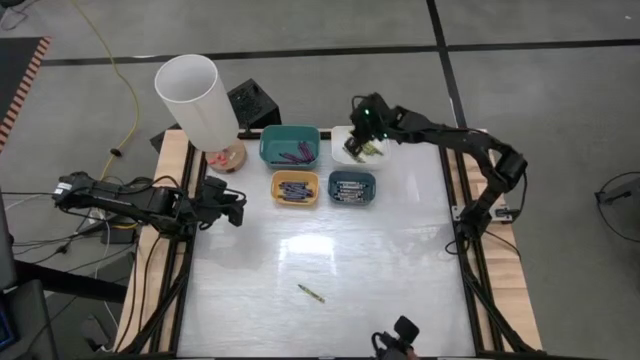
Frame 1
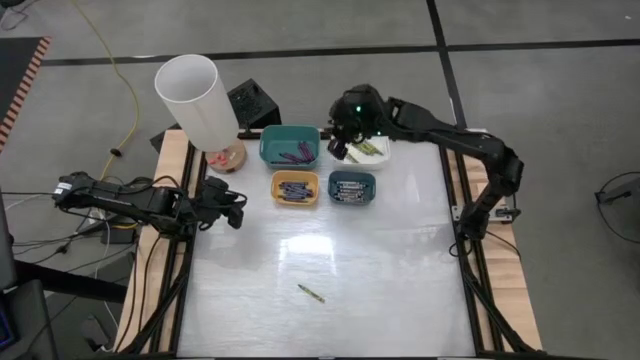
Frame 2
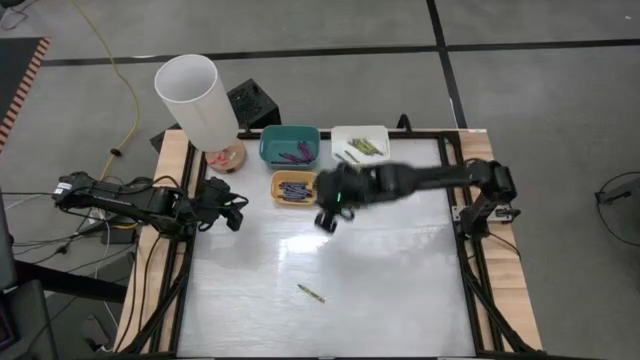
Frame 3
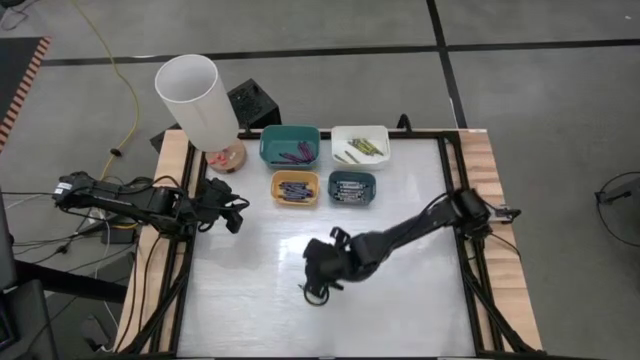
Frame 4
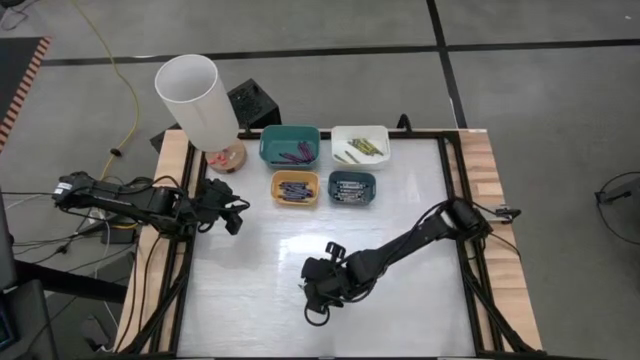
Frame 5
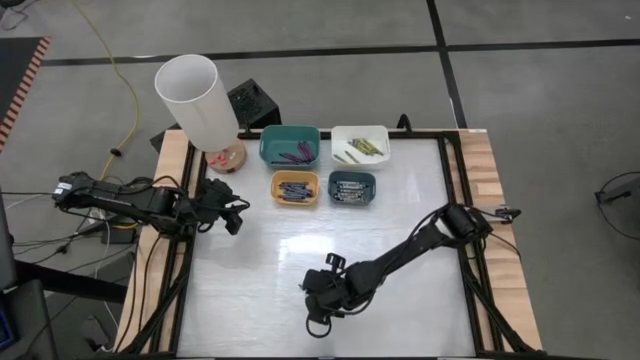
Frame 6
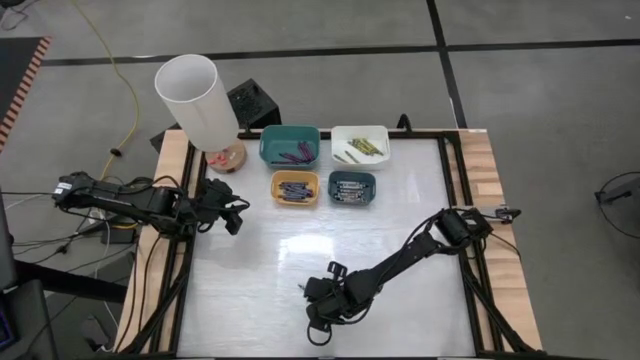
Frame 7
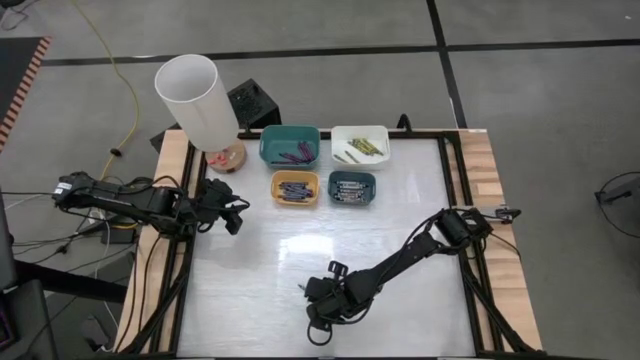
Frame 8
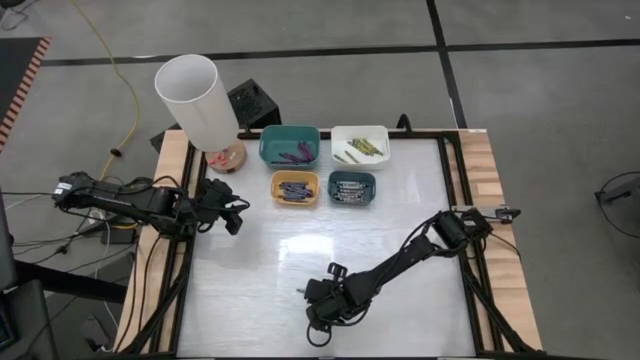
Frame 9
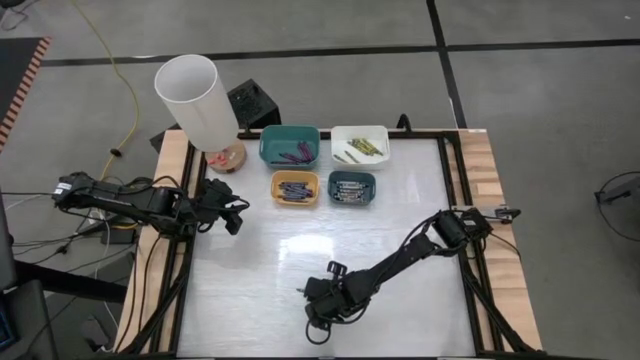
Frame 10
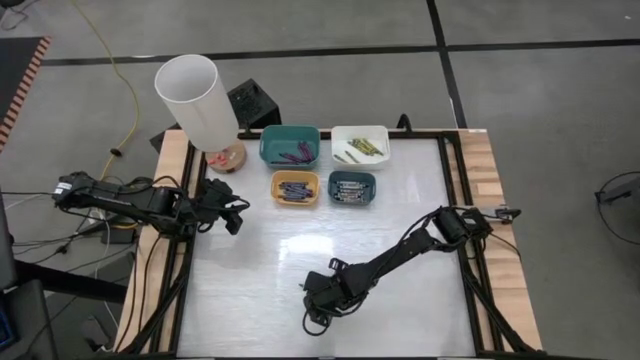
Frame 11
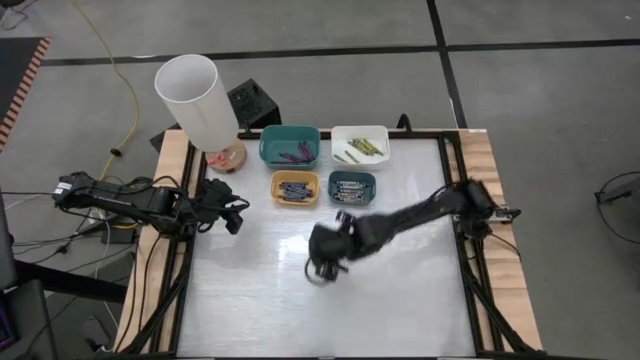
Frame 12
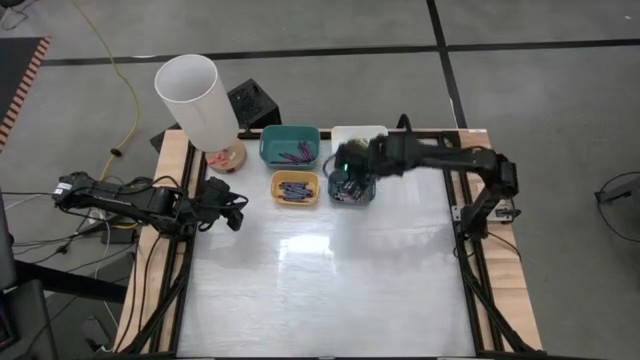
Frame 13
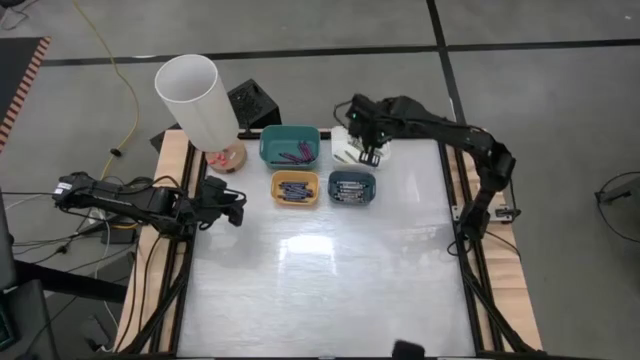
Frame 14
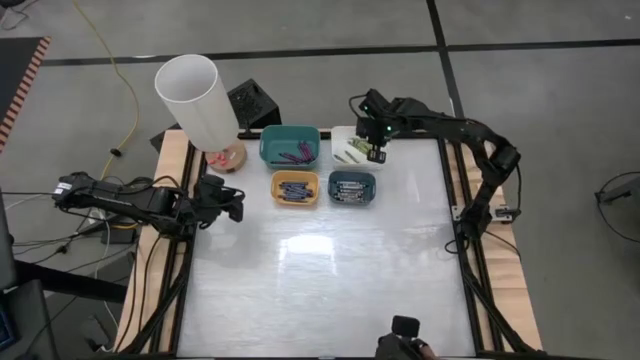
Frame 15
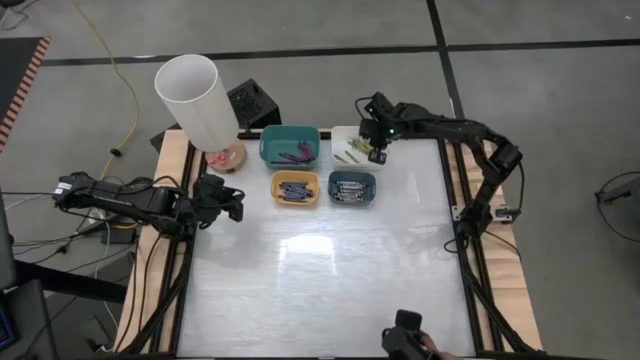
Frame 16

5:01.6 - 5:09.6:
Task: Sort crayons
Put the green crayon into the white bin

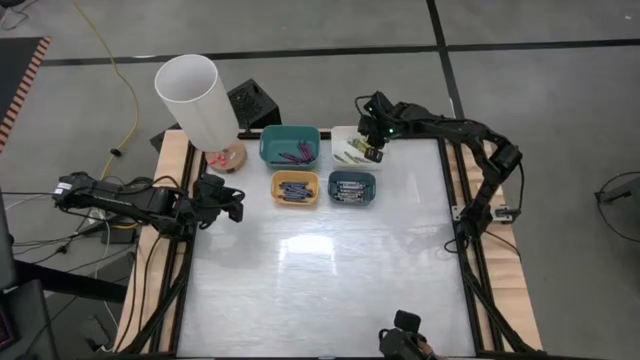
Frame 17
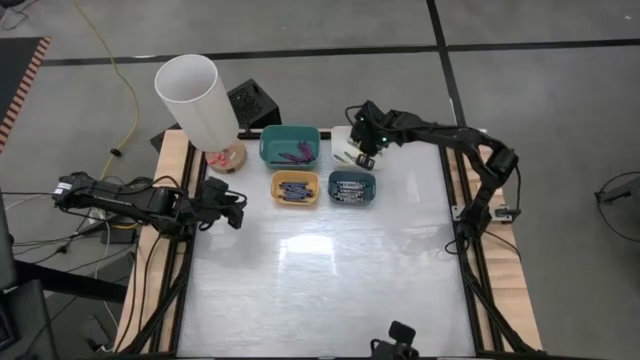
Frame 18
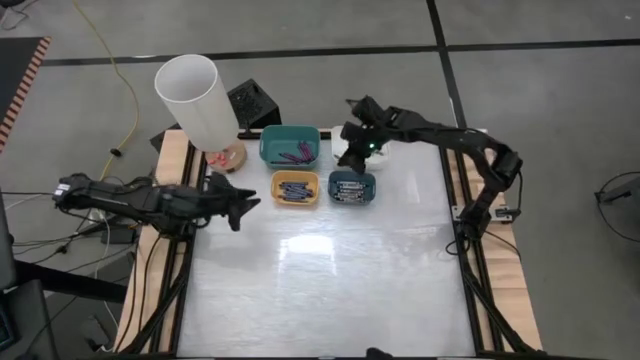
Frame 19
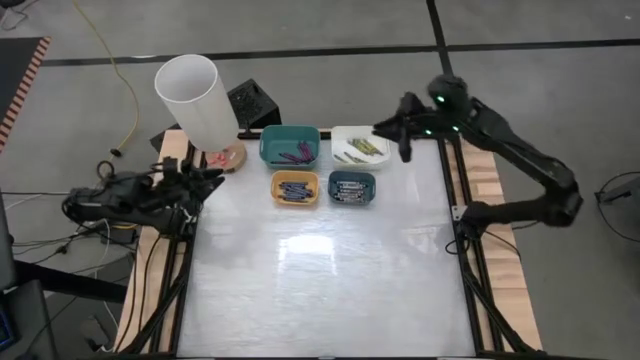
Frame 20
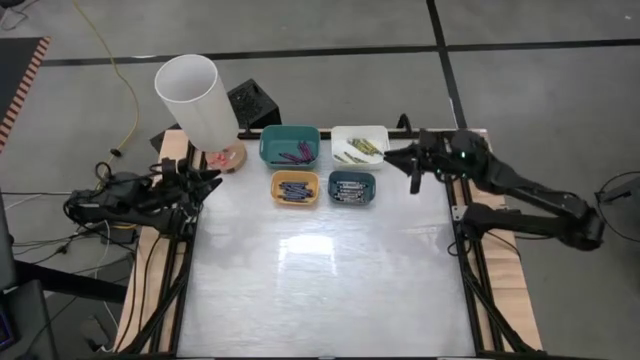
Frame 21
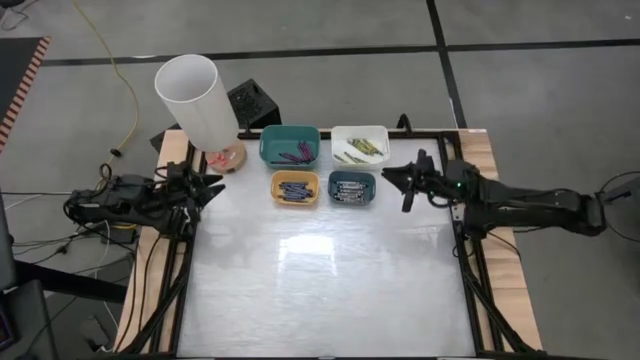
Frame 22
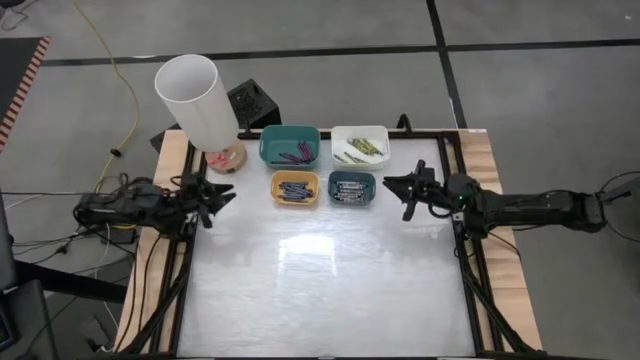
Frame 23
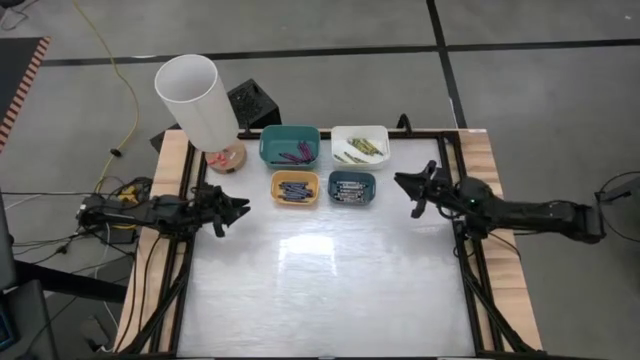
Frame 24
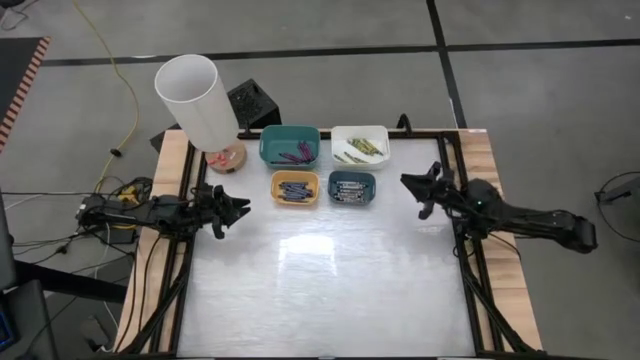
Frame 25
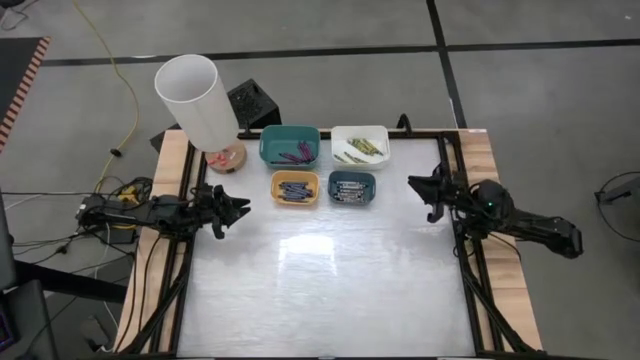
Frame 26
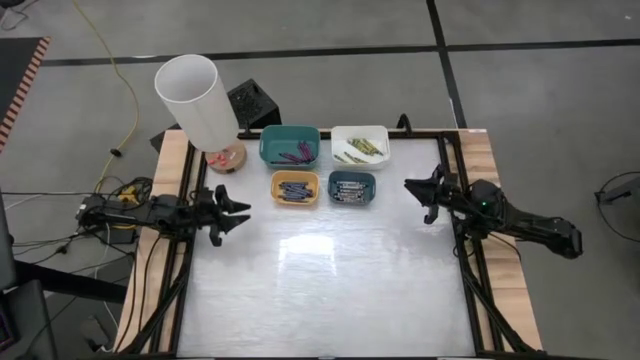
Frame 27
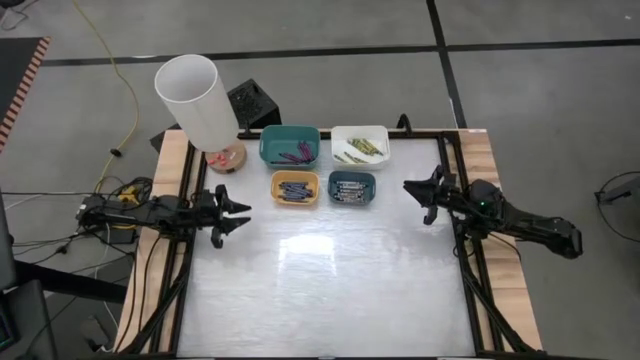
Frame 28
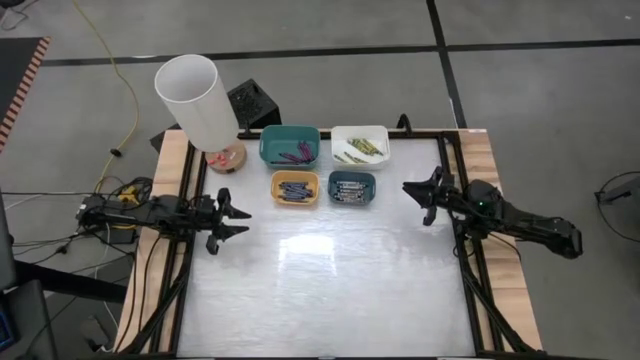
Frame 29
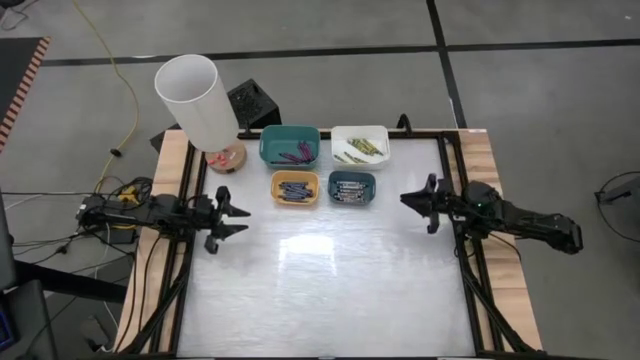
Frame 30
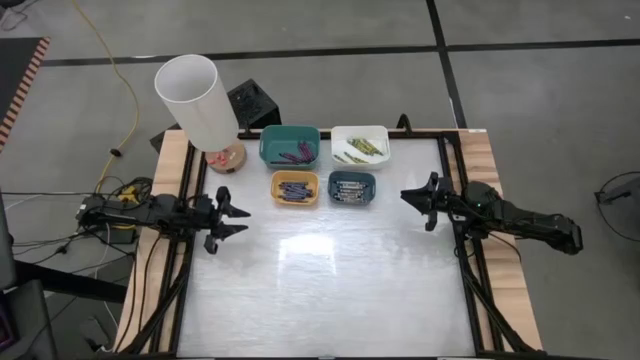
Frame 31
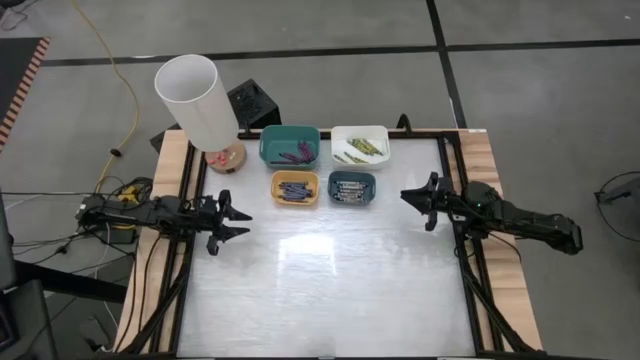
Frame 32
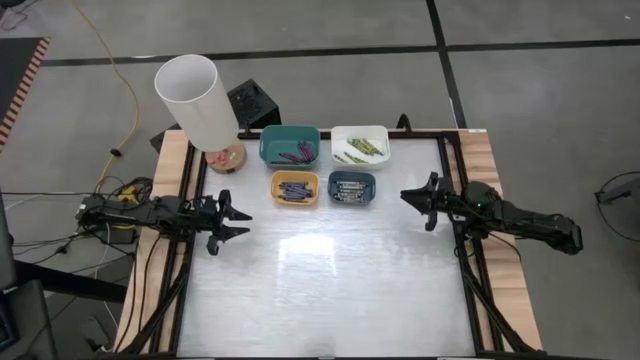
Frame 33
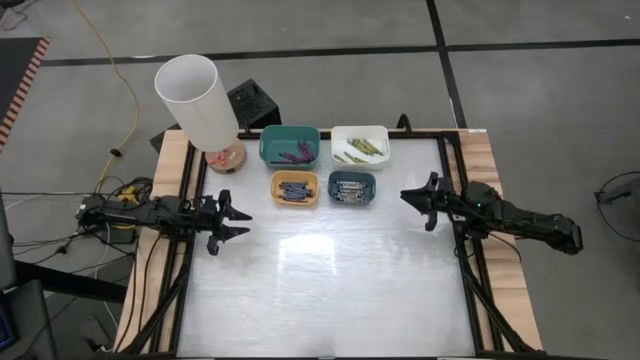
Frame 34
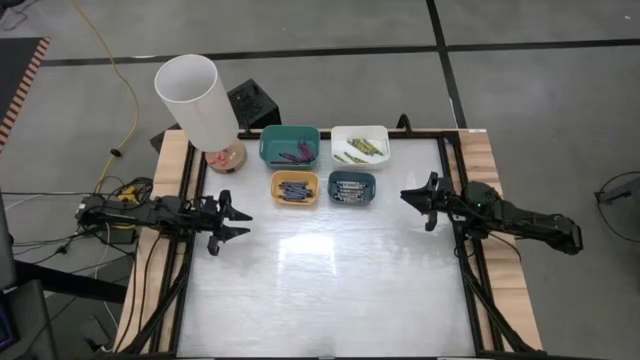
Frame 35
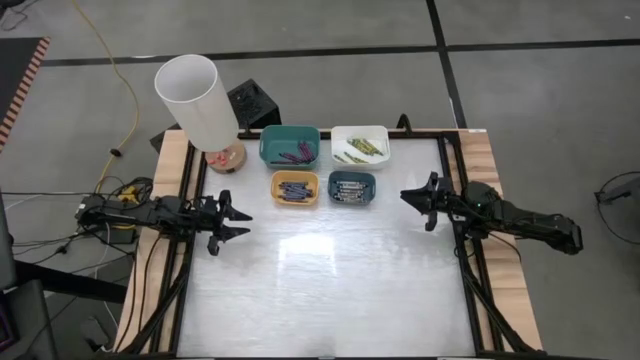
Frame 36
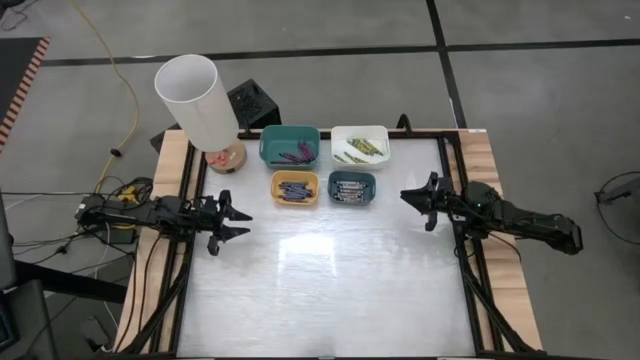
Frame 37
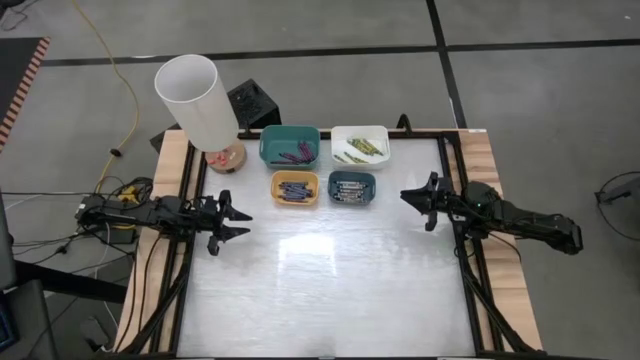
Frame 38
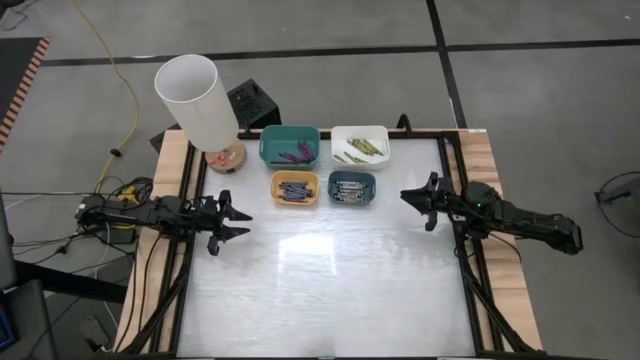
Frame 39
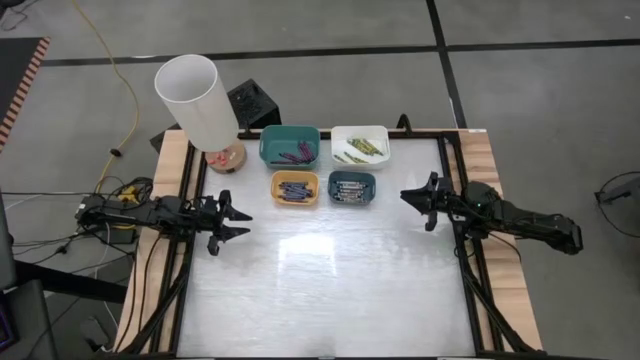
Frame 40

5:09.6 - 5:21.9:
Return to Home Position

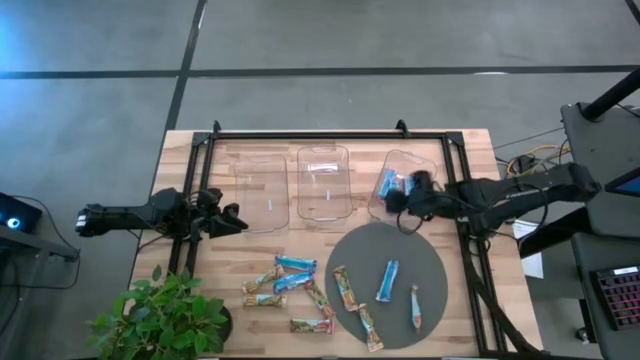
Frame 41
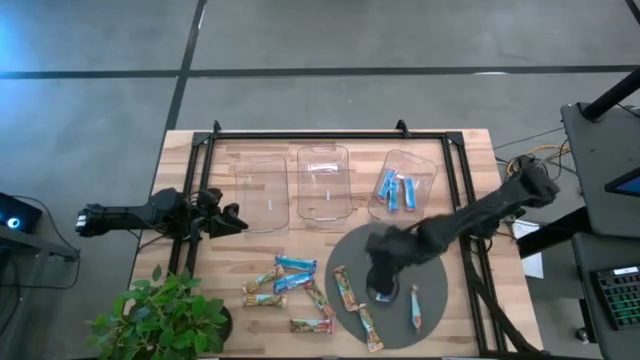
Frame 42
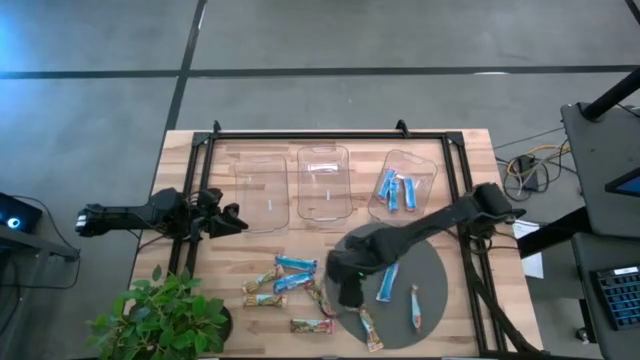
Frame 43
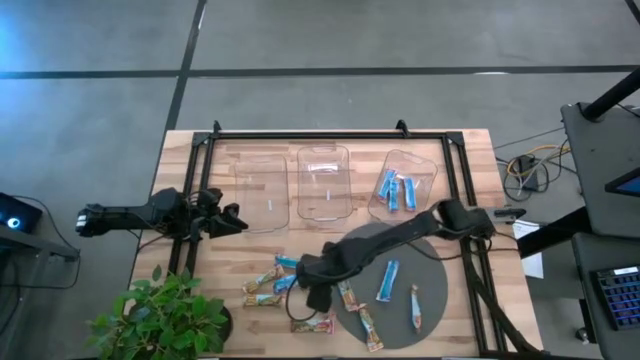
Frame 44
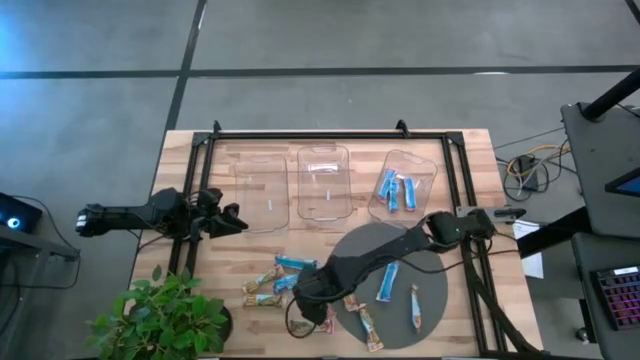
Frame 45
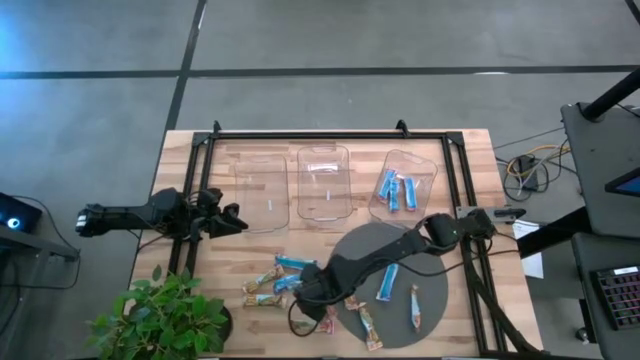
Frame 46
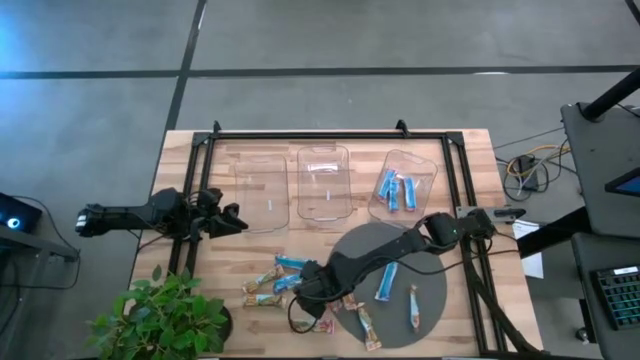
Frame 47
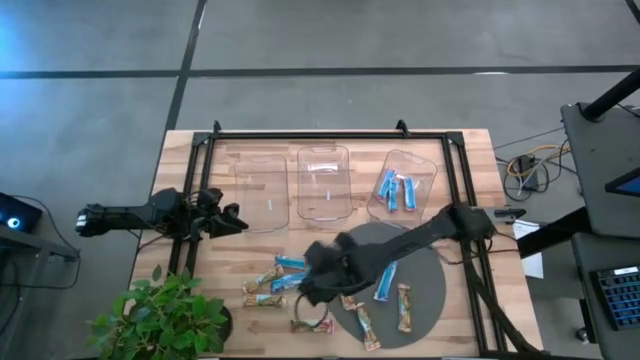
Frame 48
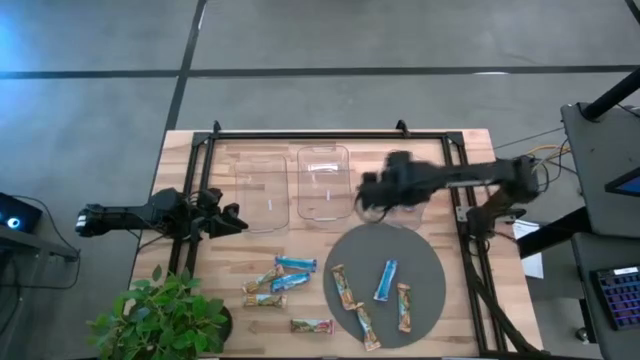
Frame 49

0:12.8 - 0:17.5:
Task: Pick and place Granola Bars by type
Put the red granola bar into the right transparent bin
